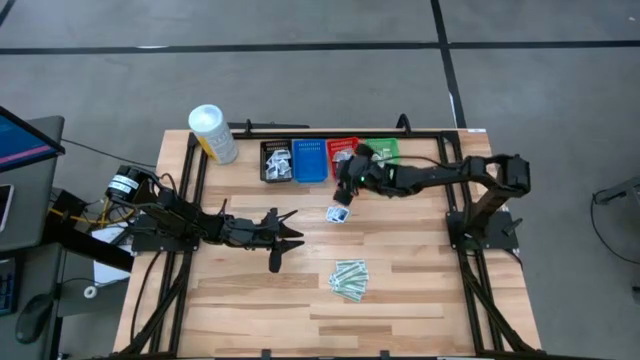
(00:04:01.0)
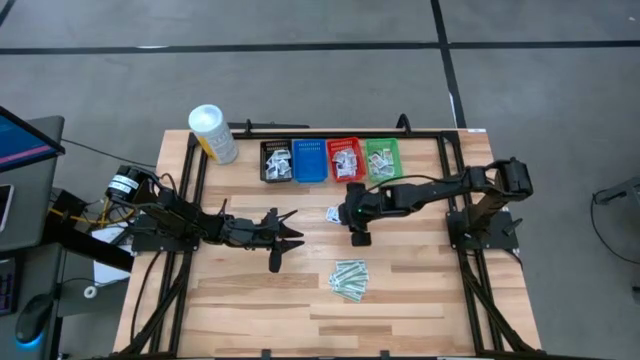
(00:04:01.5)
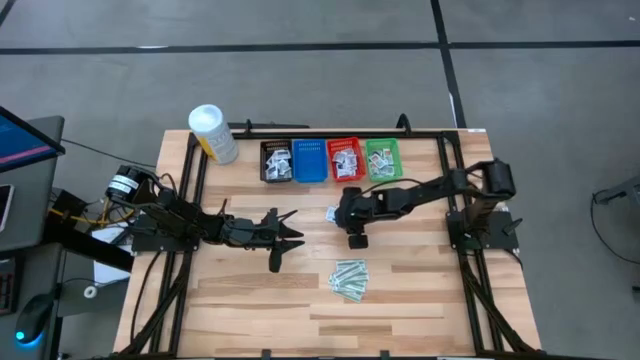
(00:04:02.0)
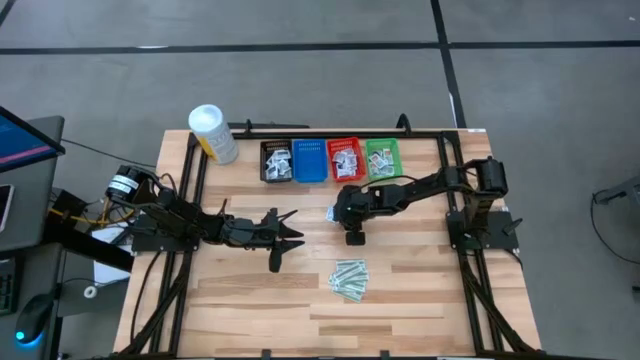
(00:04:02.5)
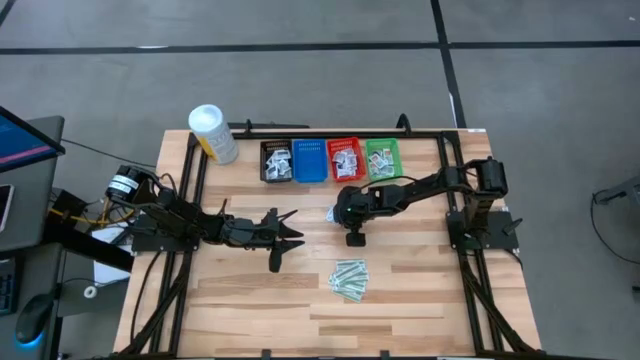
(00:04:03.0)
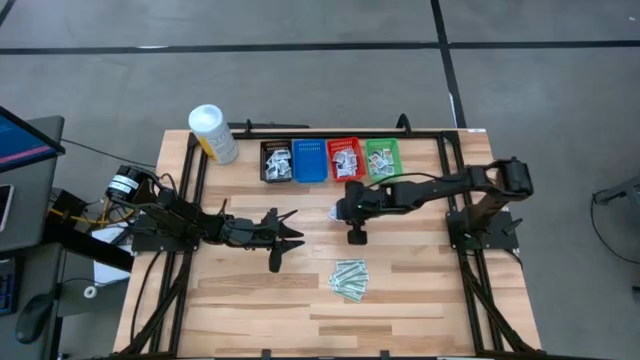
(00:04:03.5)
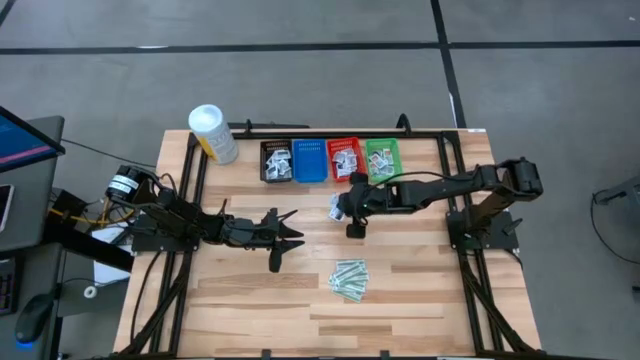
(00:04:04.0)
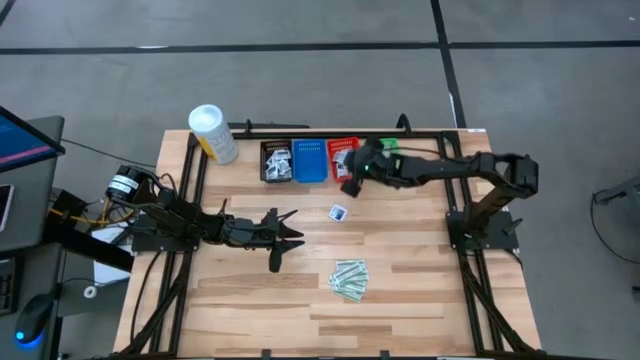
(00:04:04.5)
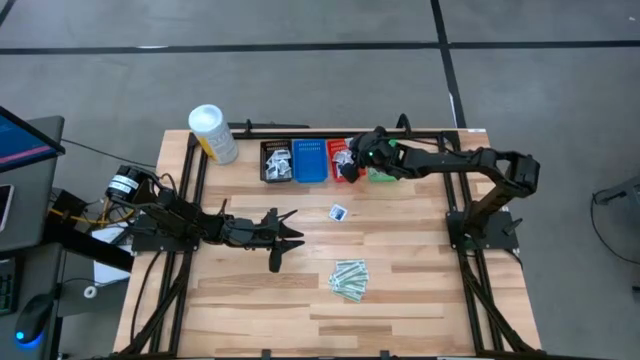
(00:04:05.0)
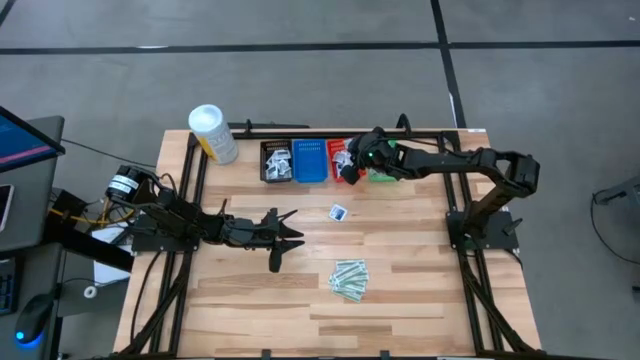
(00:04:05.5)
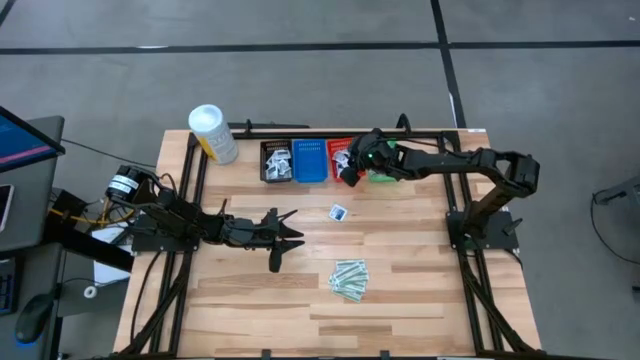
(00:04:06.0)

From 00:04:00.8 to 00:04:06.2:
Task: Pick & Place First Aid Supplies
Put the blue pad into the red bin

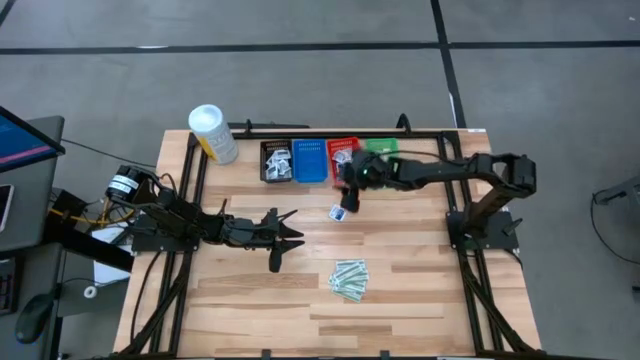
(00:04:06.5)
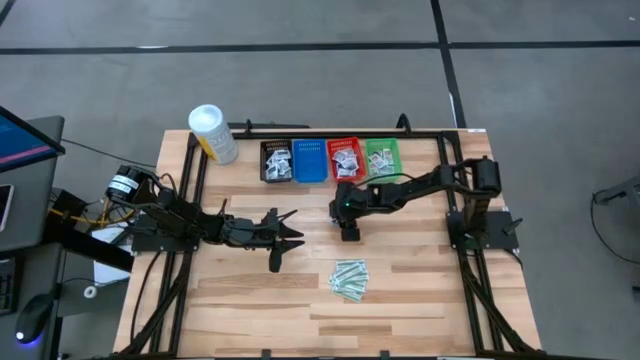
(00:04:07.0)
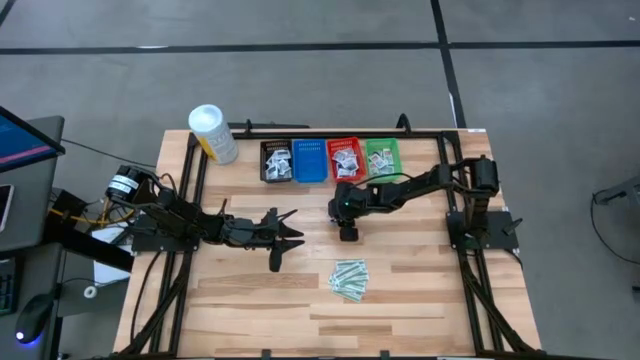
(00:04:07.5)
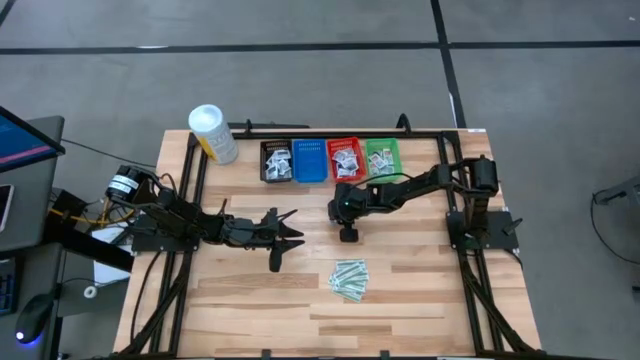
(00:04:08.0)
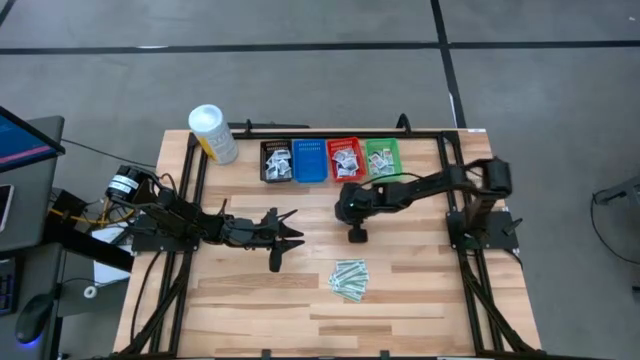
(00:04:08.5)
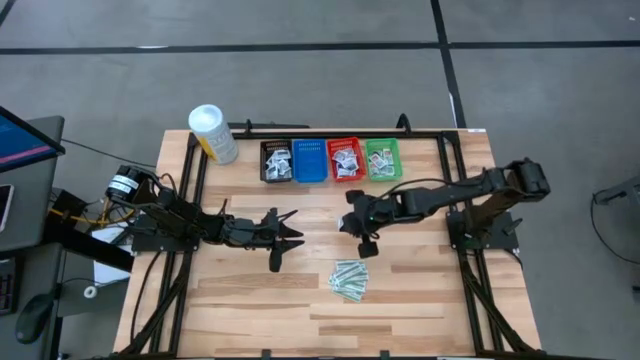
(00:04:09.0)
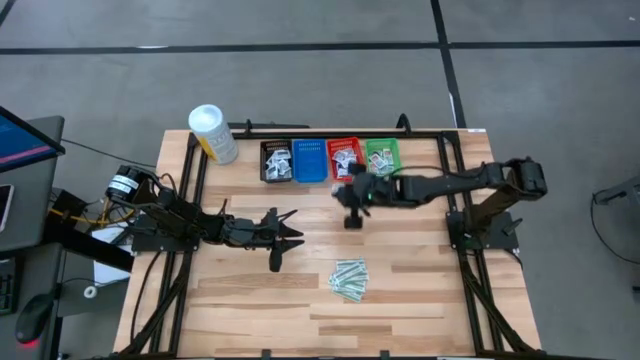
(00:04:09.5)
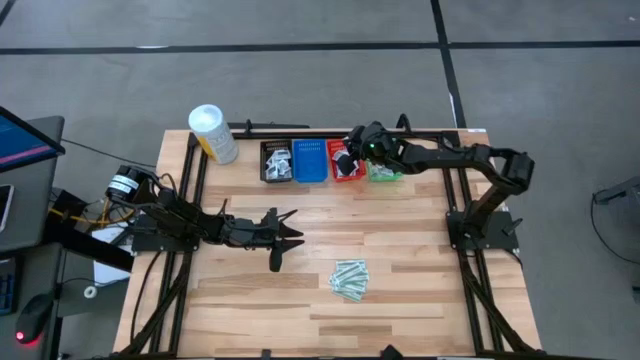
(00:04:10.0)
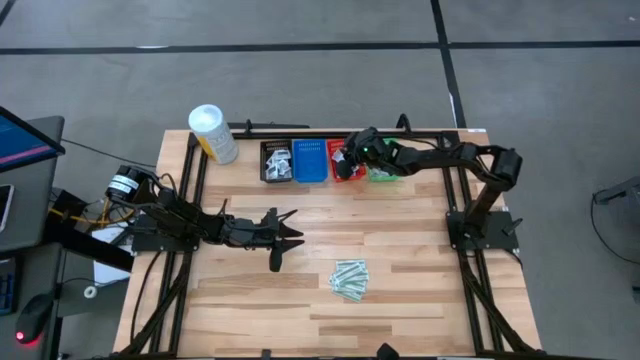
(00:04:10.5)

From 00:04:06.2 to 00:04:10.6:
Put the blue pad into the red bin

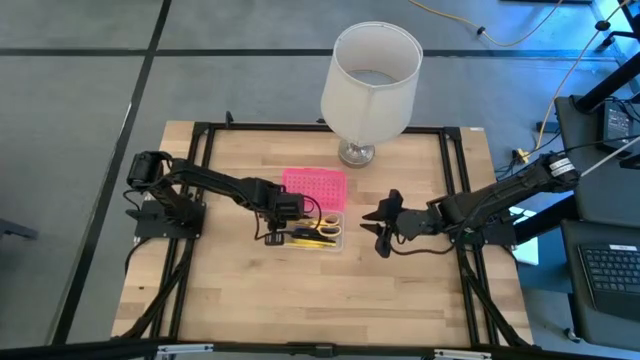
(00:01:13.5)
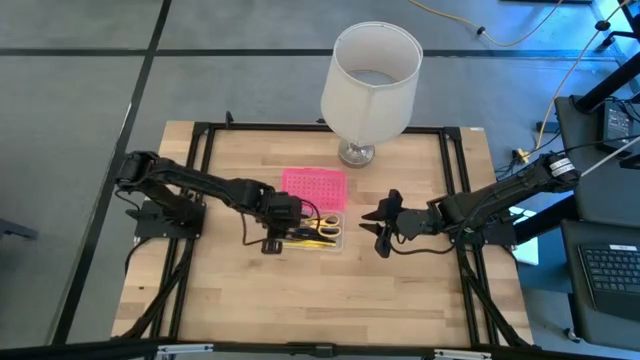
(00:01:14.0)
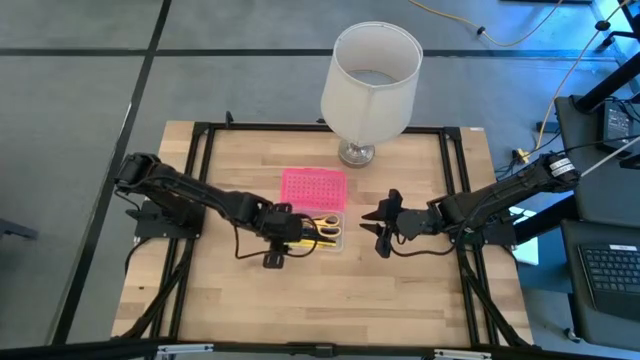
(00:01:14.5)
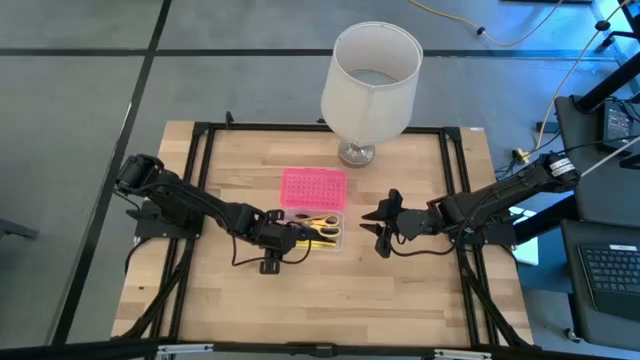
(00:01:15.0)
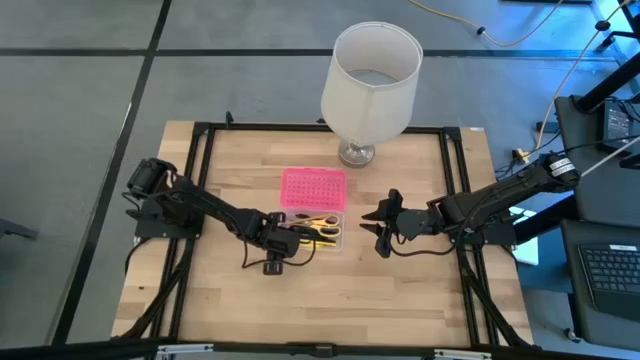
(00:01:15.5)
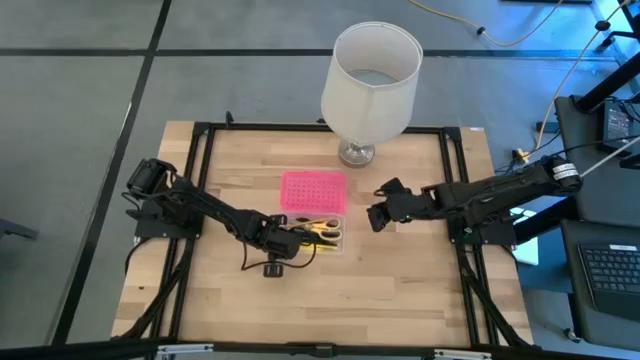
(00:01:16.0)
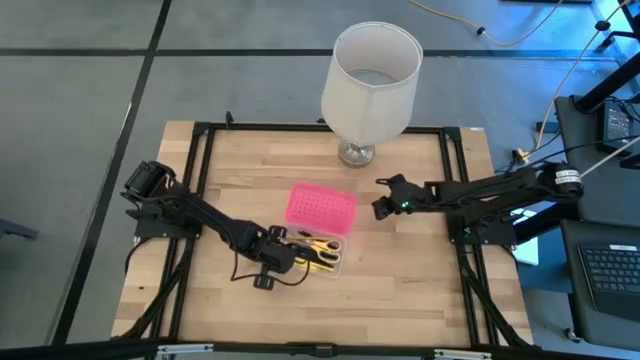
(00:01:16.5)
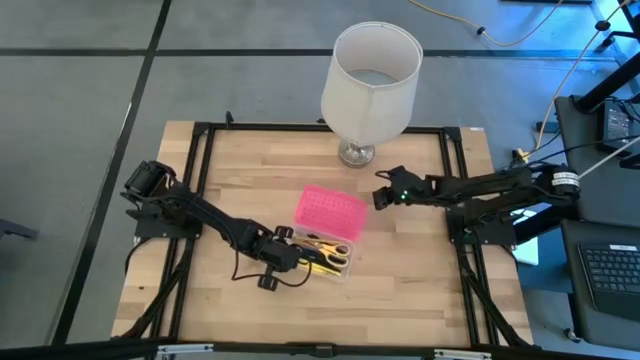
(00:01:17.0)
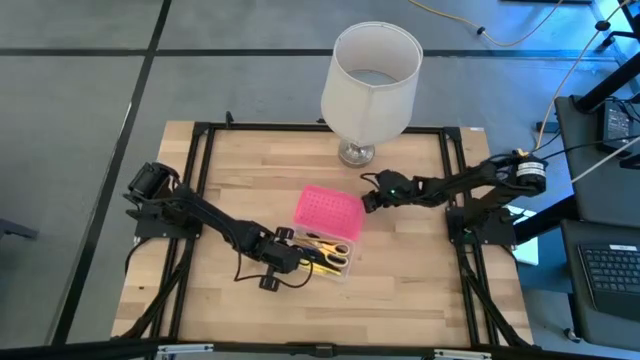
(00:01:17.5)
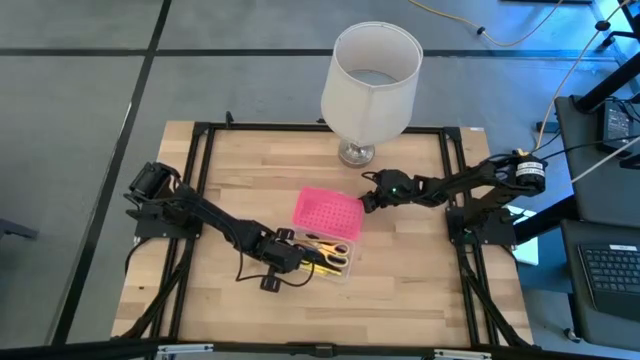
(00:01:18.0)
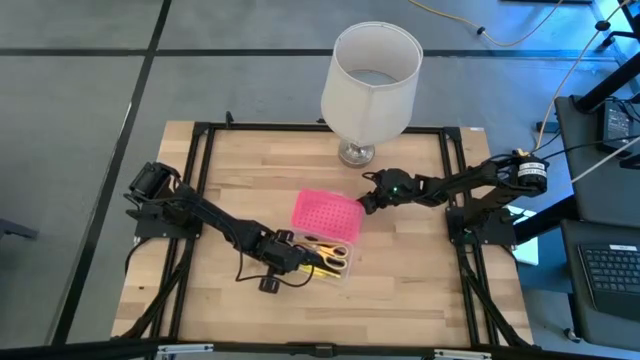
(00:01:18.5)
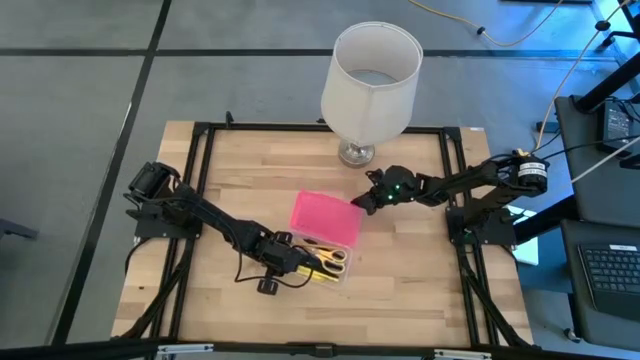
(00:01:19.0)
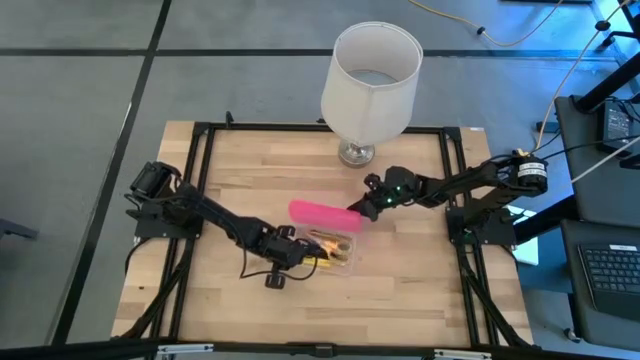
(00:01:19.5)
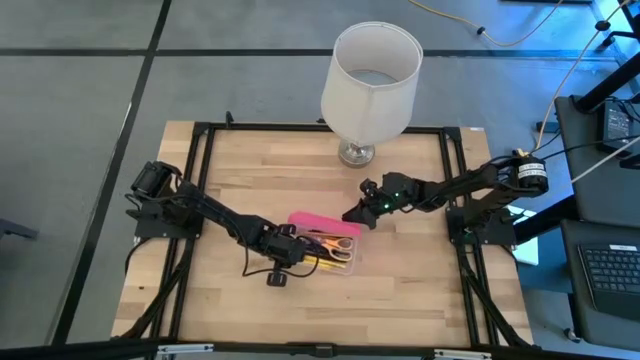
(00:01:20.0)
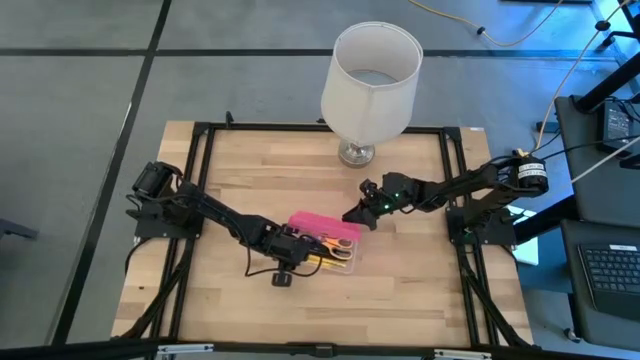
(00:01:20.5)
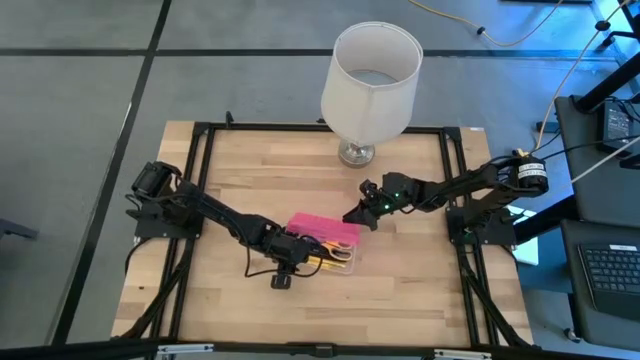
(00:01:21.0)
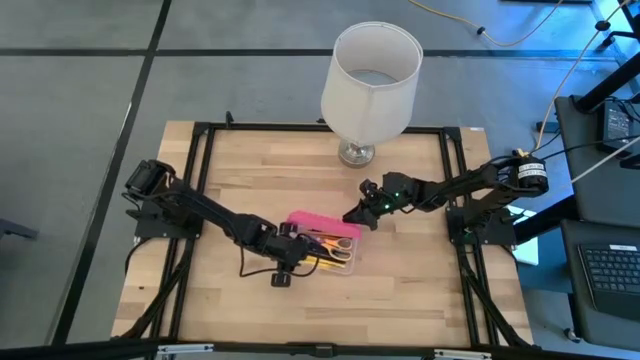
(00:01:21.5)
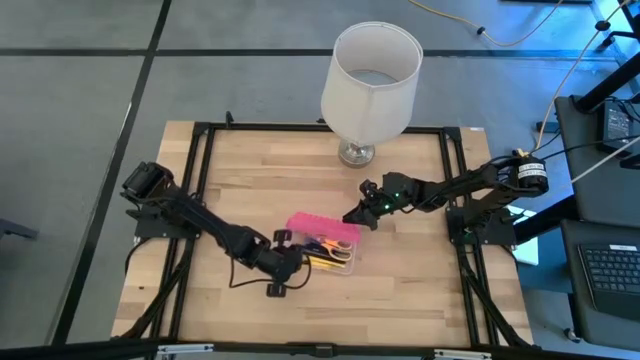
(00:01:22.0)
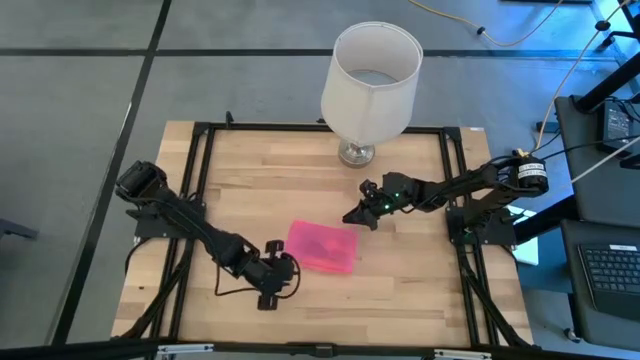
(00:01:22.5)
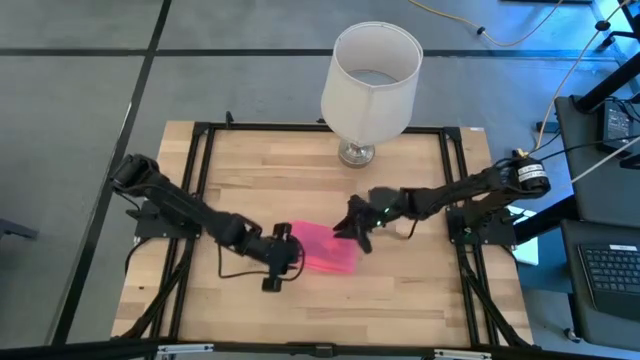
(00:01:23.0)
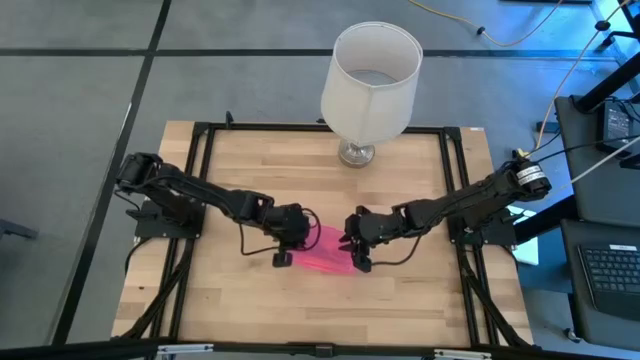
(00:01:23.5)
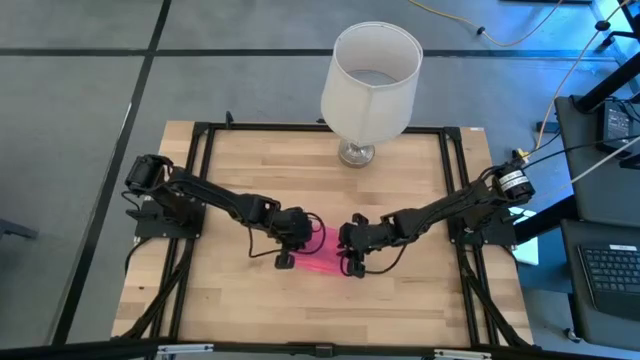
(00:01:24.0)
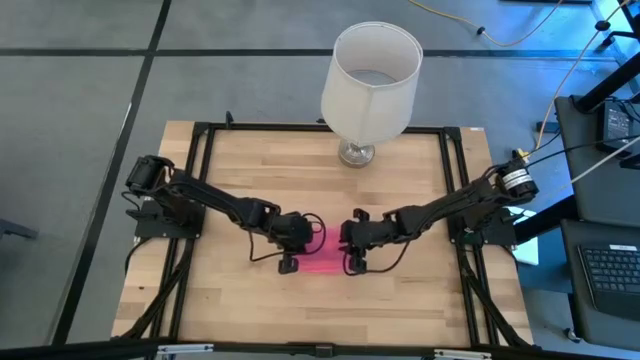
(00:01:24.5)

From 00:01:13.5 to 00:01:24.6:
Task: Pick & place school supplies into a supply box
Close the supply box
